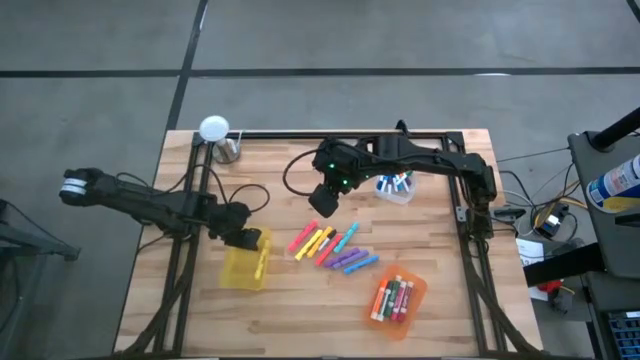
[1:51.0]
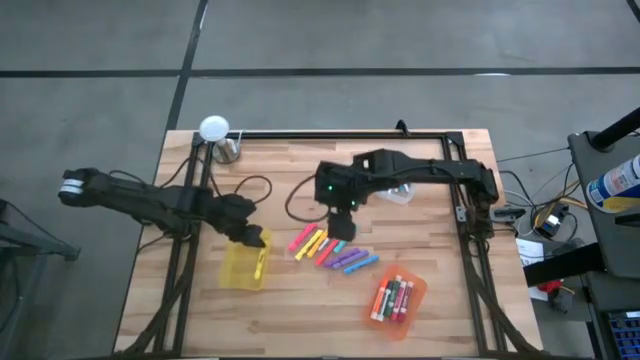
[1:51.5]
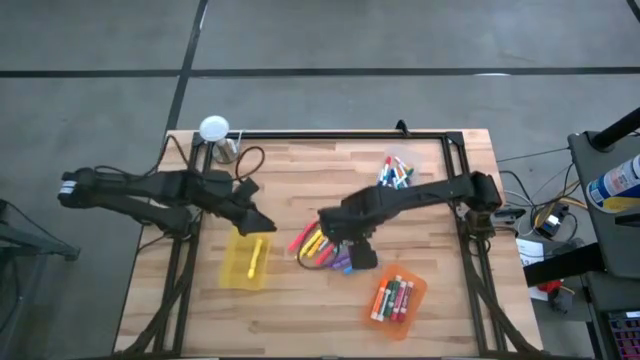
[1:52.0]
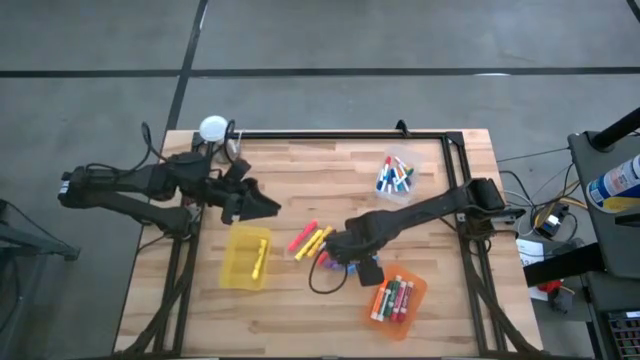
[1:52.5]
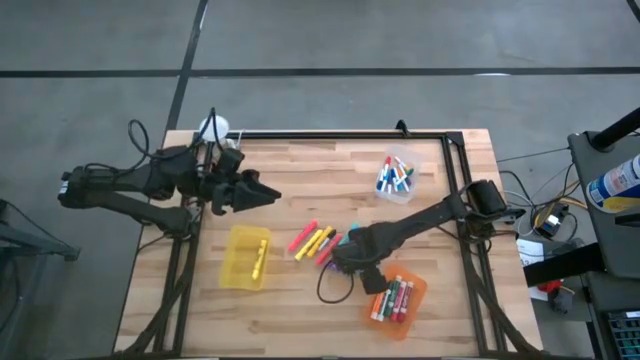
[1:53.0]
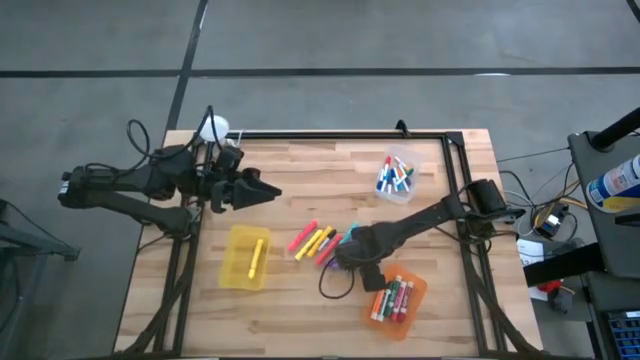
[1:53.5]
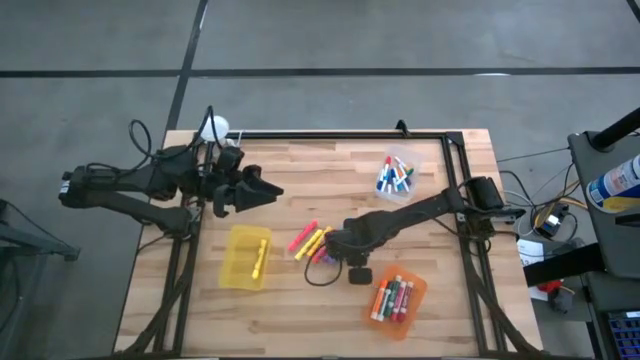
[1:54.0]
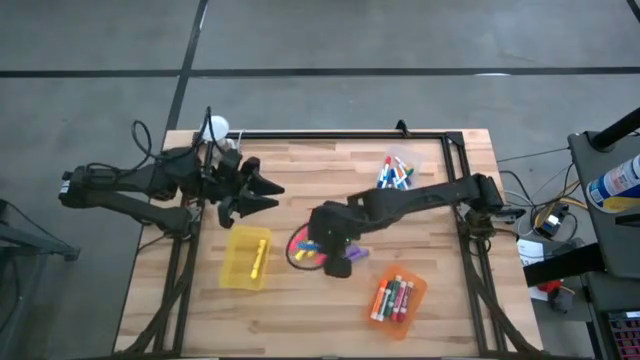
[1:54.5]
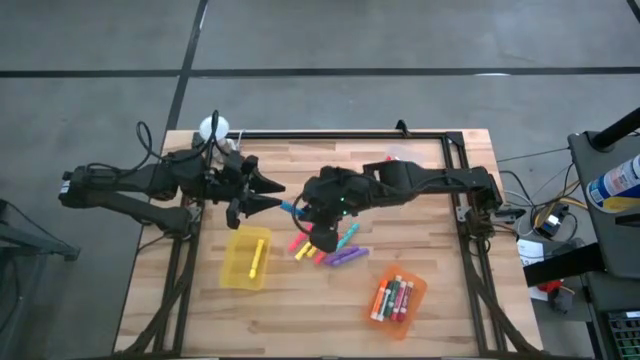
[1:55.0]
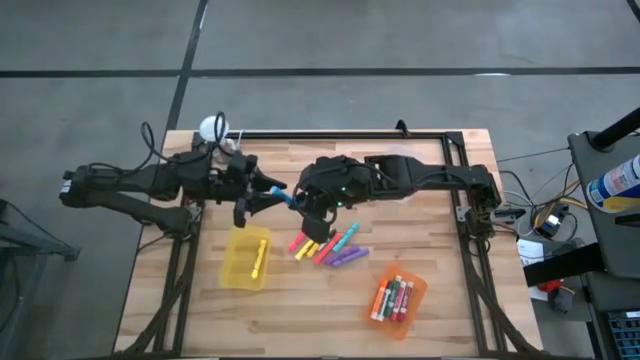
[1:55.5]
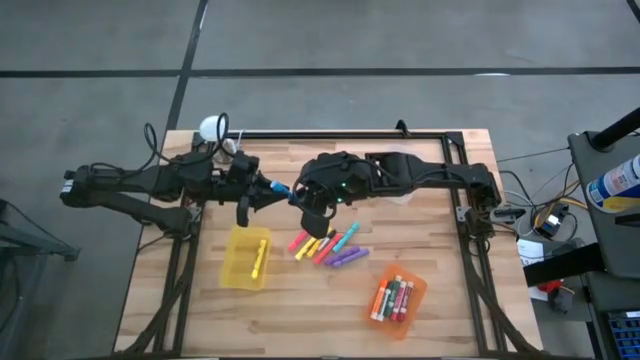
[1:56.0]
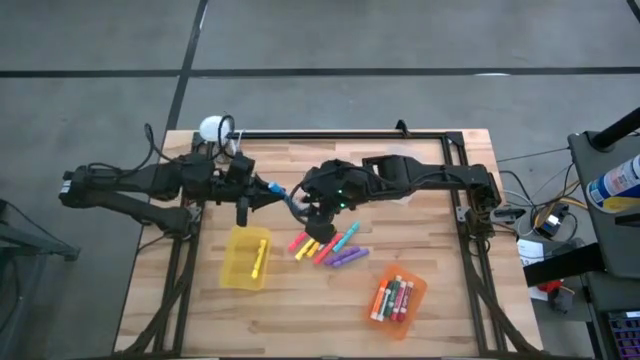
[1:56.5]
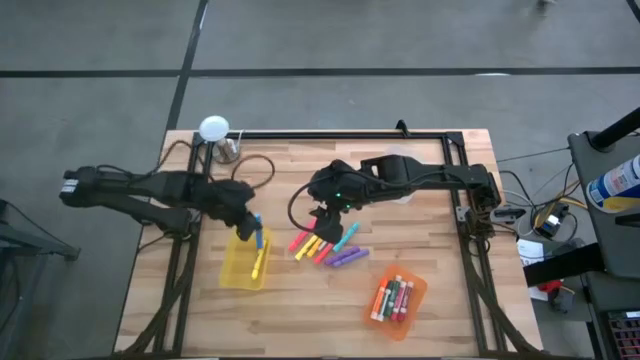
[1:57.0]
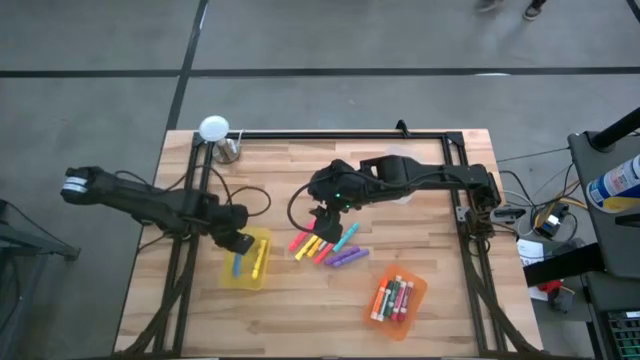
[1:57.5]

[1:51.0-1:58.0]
Task: Pick & Place Markers
Put the large blue highlighter pen into the yellow bin

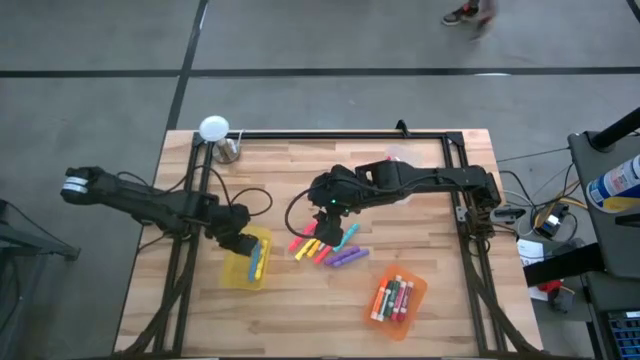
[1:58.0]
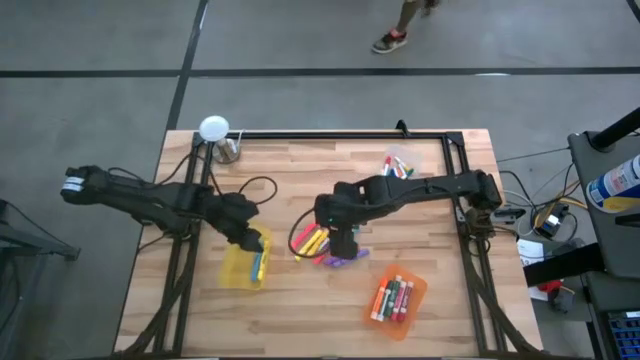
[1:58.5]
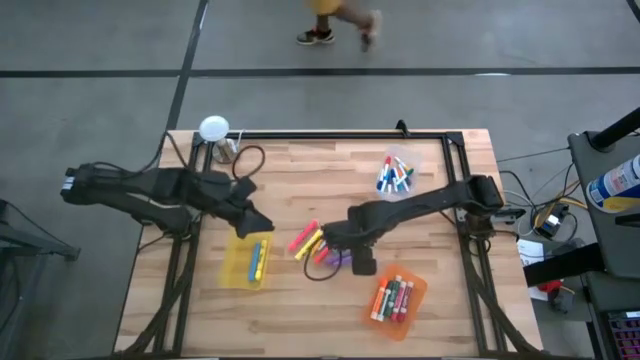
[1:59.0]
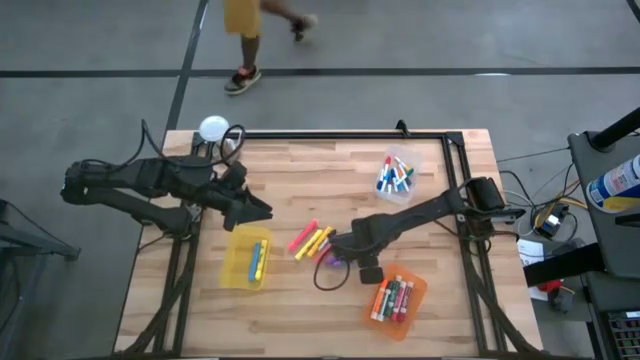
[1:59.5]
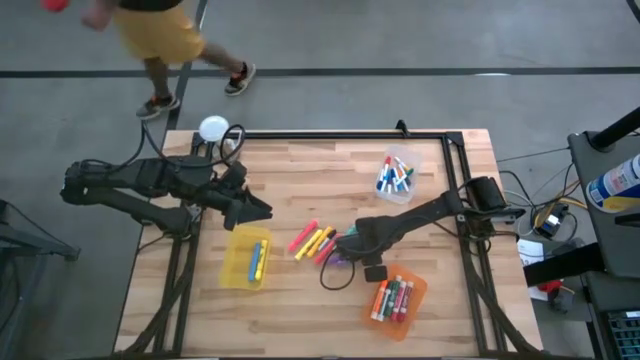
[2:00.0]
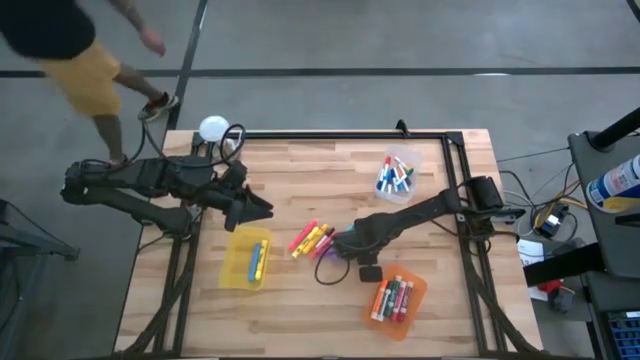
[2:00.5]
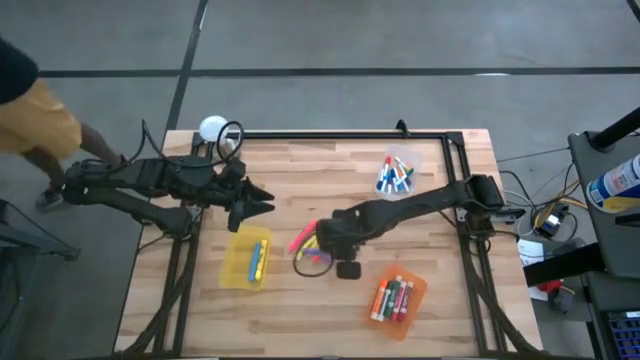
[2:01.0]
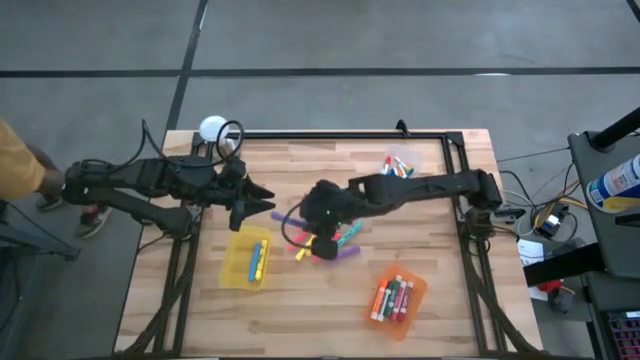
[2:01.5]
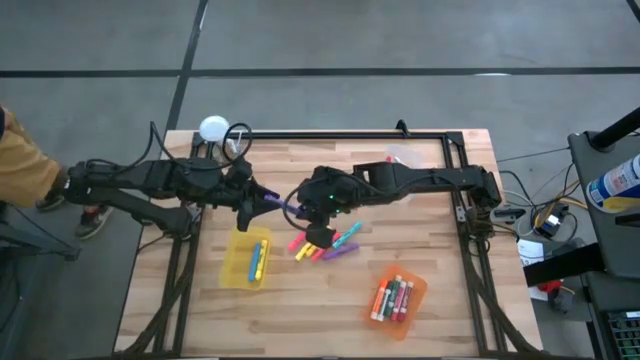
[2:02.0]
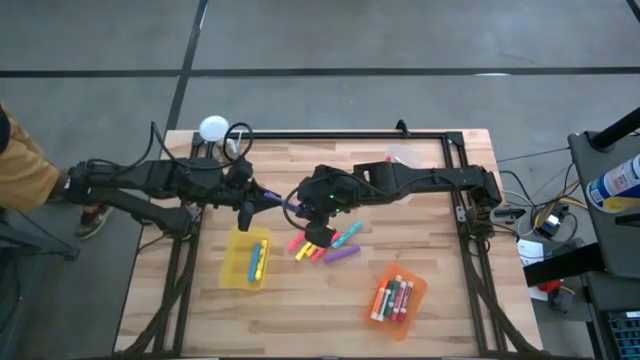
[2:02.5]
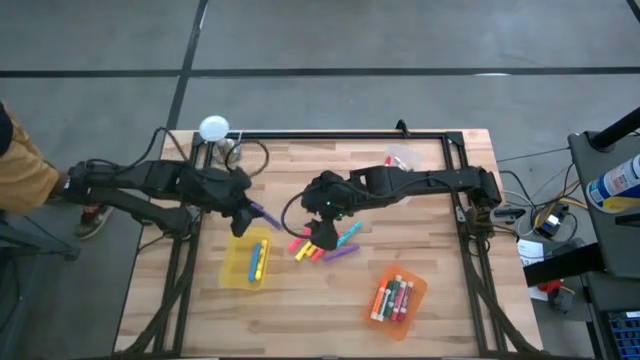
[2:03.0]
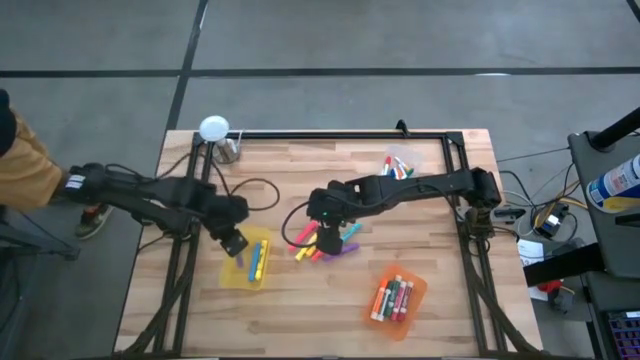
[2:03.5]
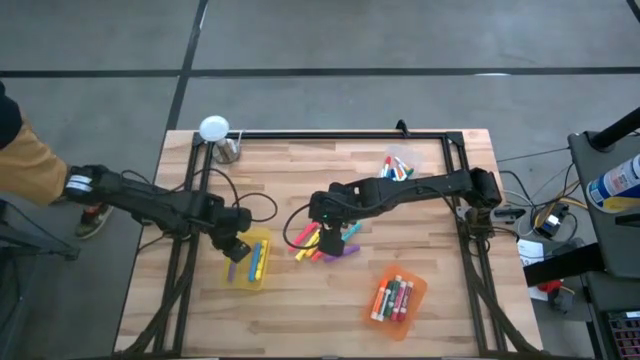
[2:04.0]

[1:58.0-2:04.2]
Put the large purple highlighter pen into the yellow bin

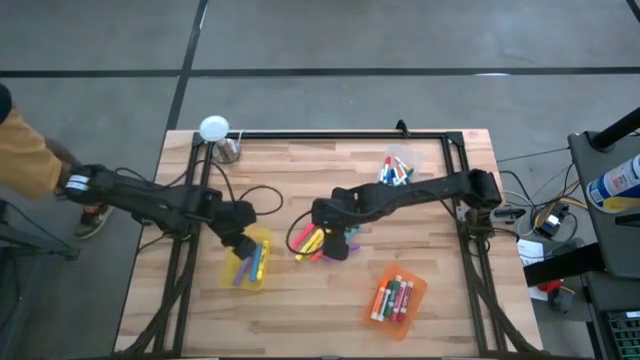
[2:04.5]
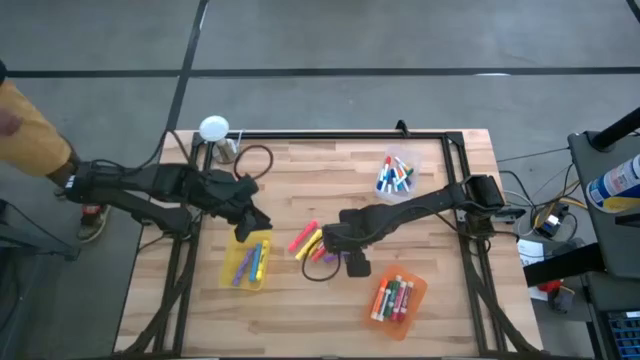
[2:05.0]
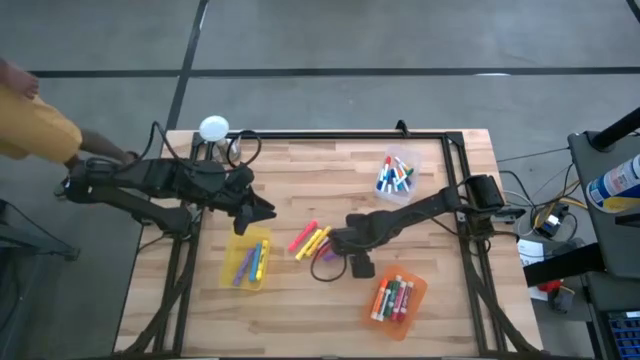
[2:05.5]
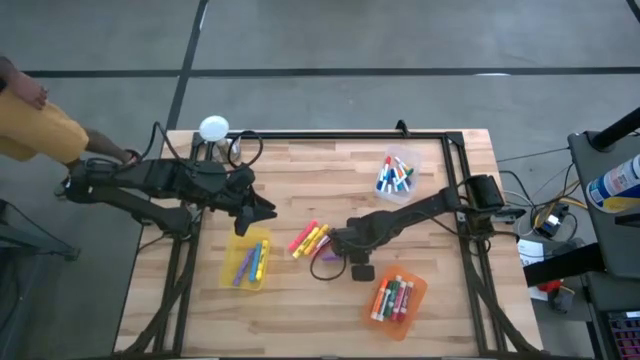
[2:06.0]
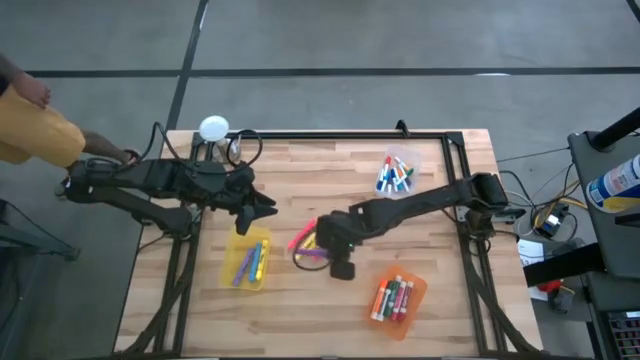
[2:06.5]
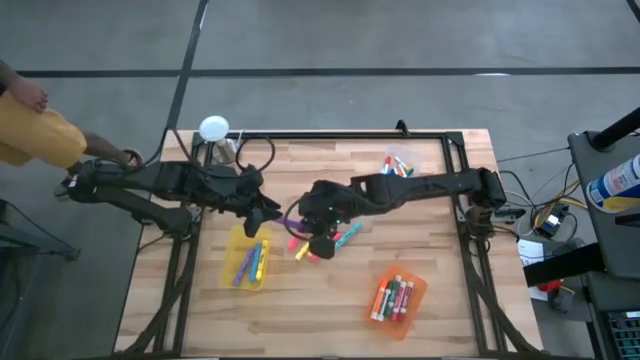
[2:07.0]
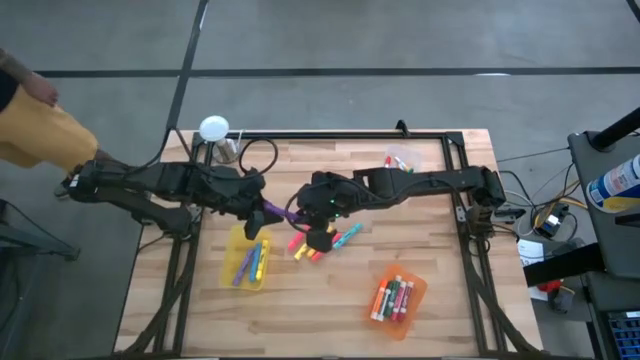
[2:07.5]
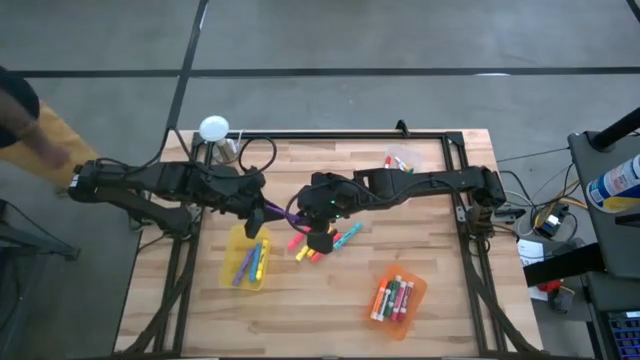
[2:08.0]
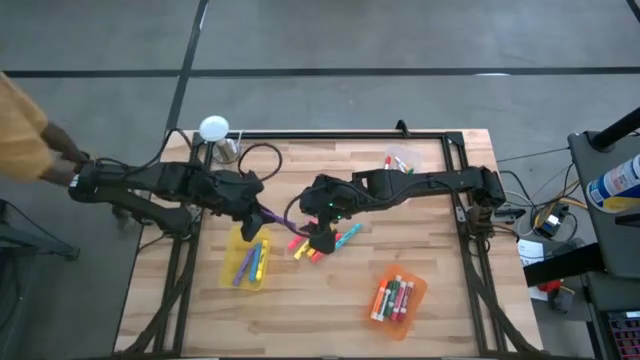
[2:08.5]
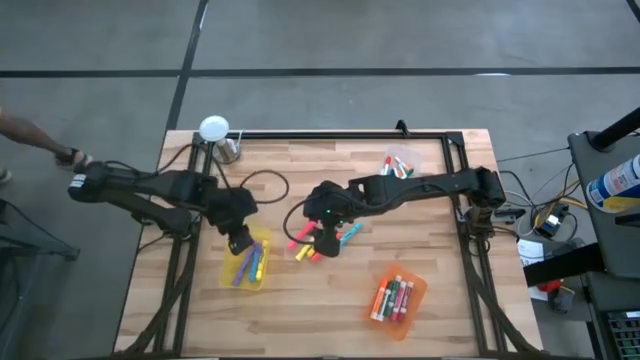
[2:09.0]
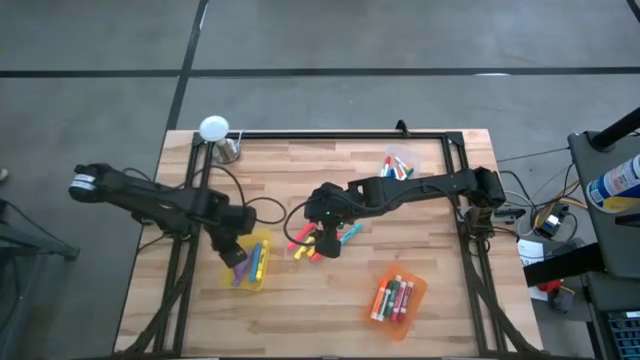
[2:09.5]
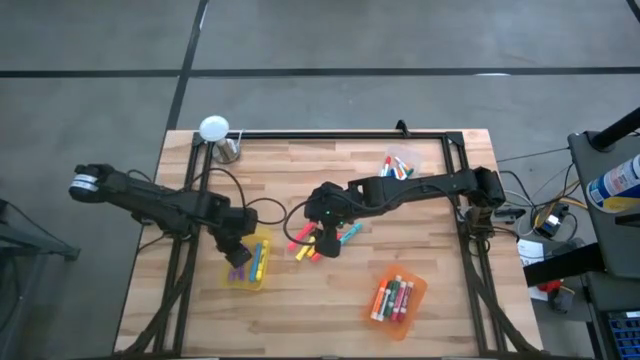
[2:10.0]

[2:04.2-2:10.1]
Put the large dark purple highlighter pen into the yellow bin

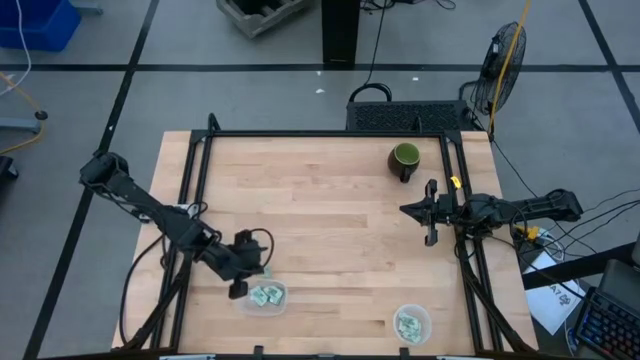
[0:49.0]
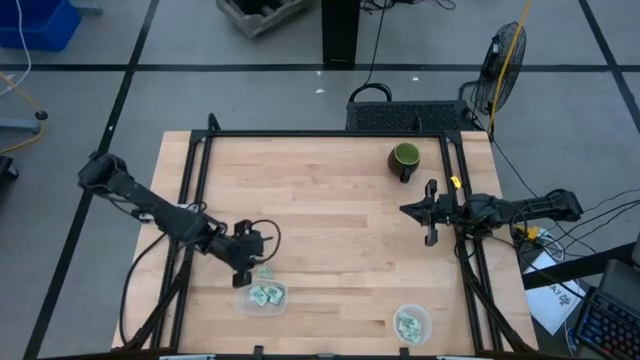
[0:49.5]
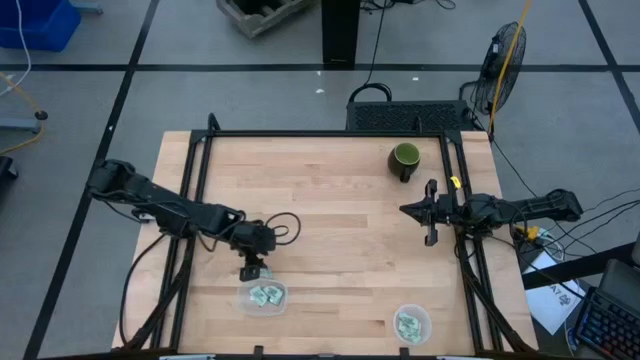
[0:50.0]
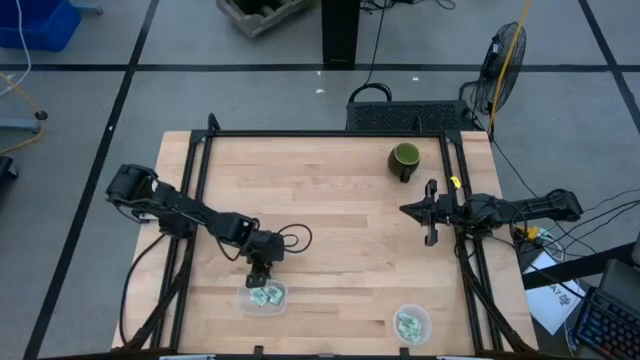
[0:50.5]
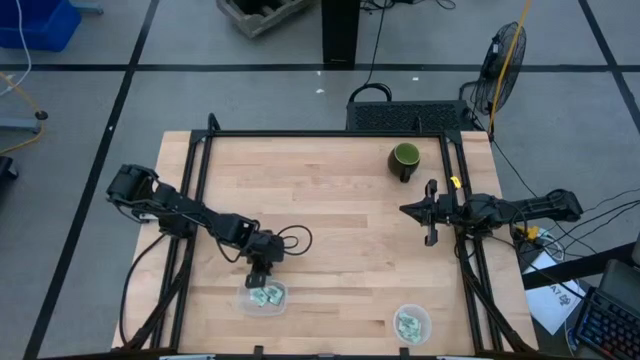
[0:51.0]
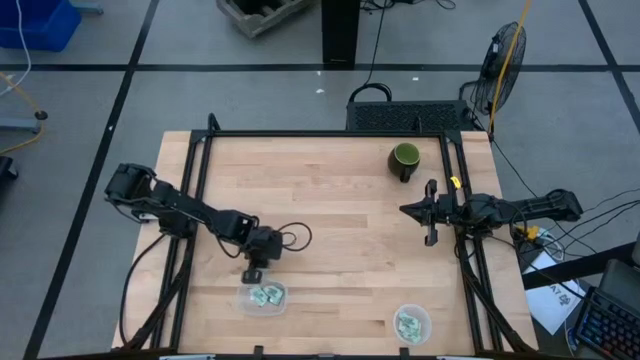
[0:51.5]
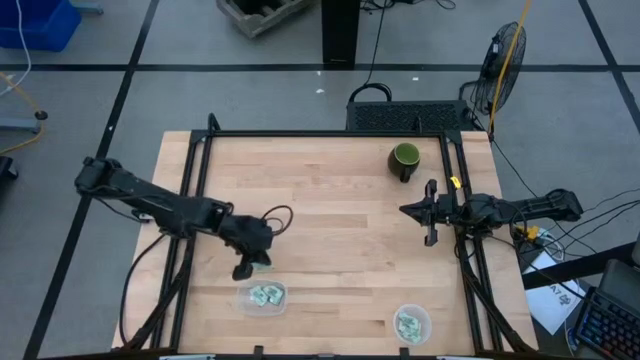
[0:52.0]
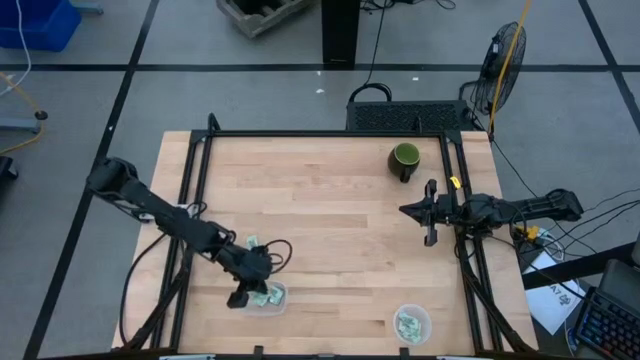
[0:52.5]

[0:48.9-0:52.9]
Task: Pick and place Stevia / Truvia into bins
Put the stevia packet into the left transparent container
